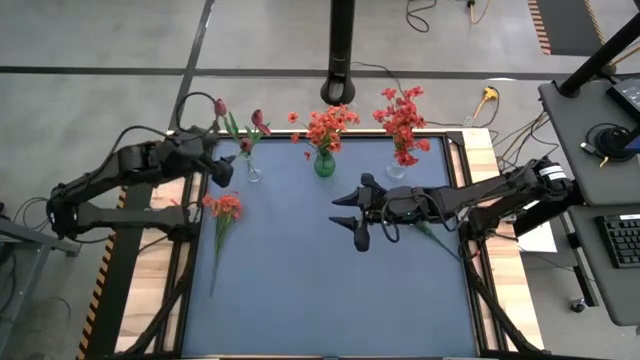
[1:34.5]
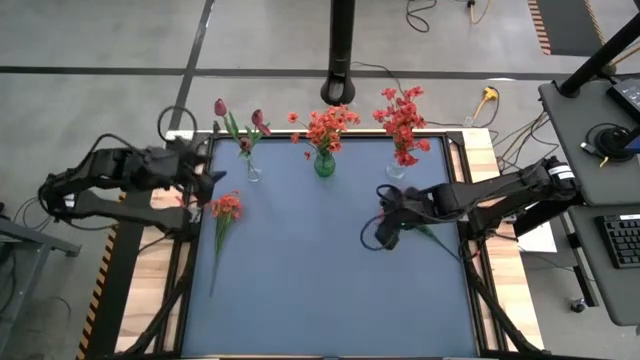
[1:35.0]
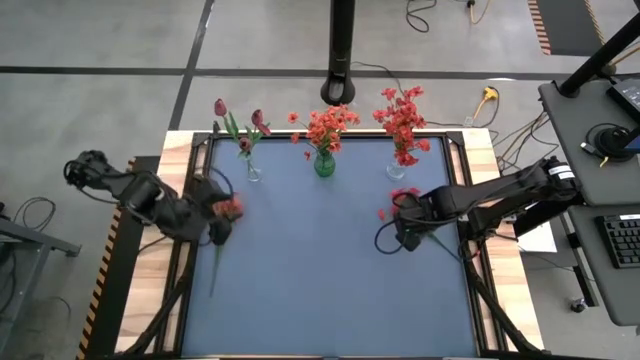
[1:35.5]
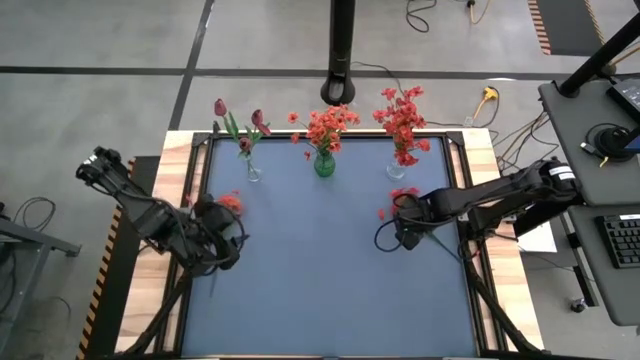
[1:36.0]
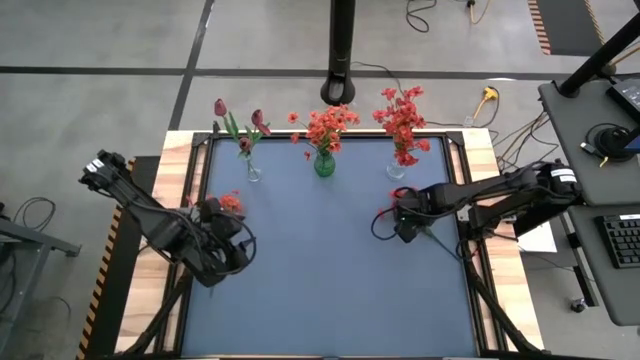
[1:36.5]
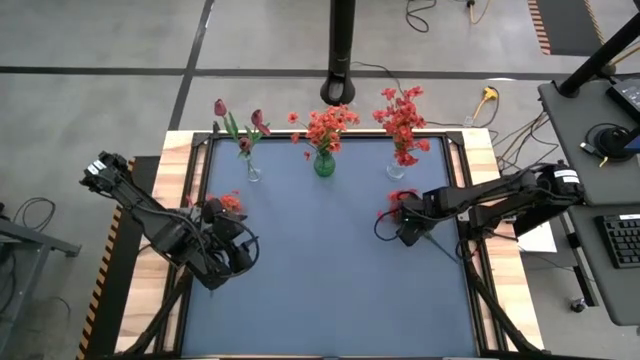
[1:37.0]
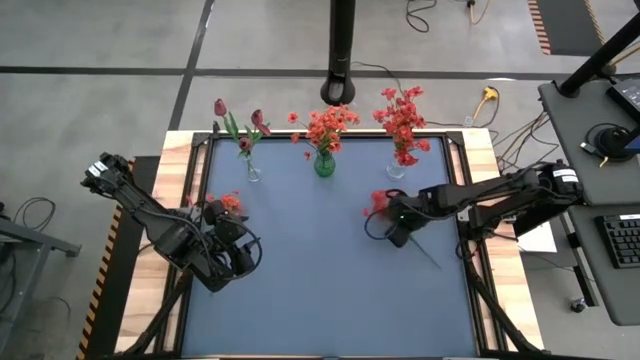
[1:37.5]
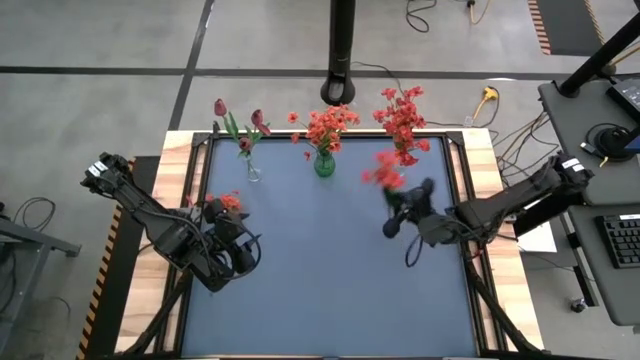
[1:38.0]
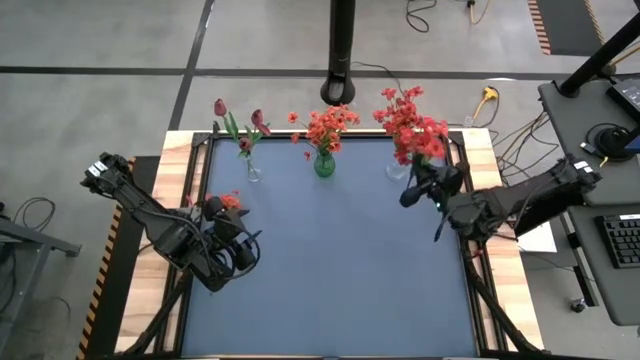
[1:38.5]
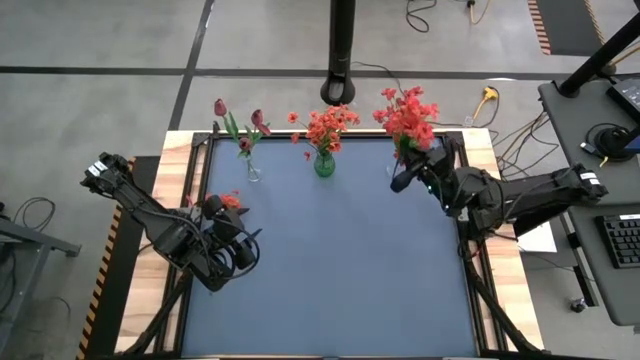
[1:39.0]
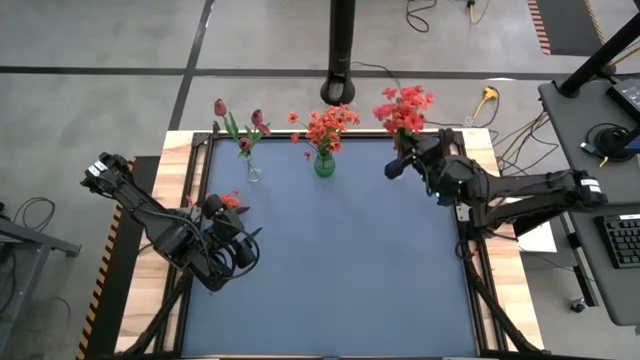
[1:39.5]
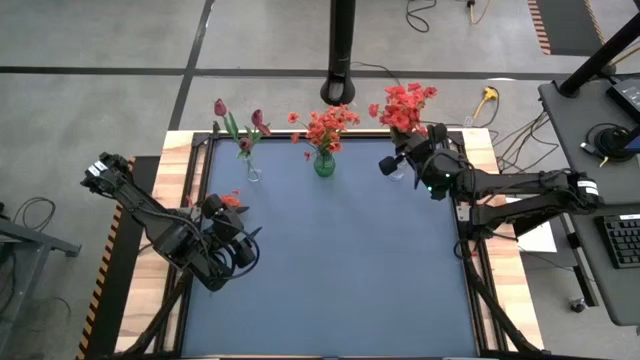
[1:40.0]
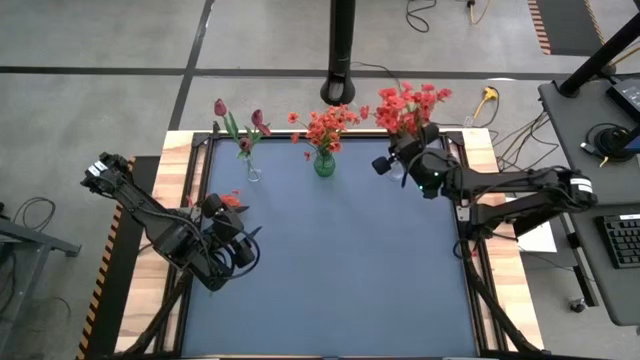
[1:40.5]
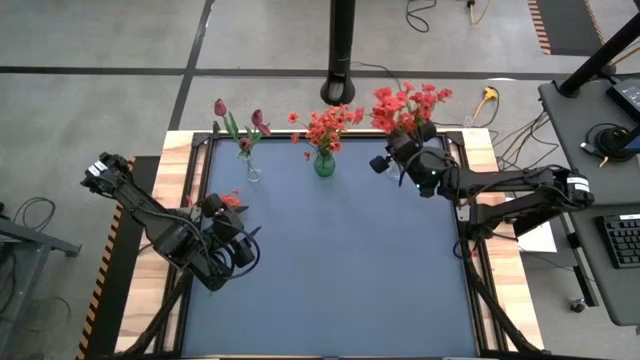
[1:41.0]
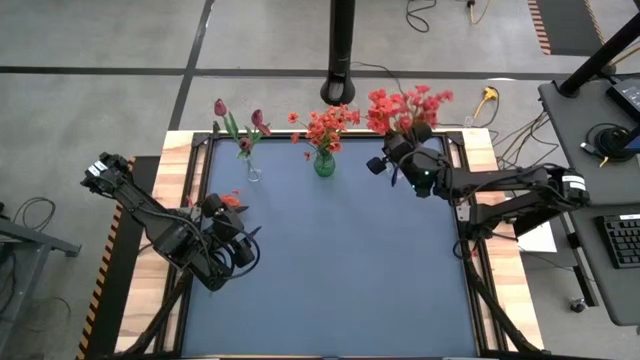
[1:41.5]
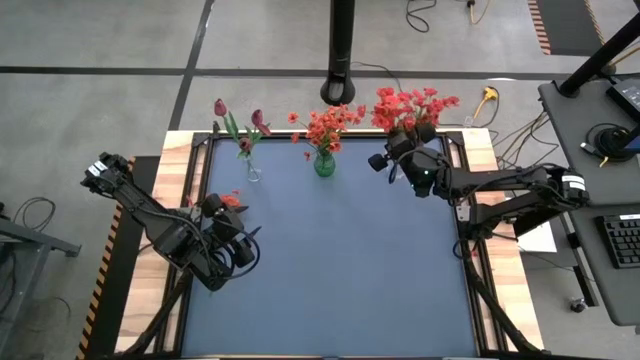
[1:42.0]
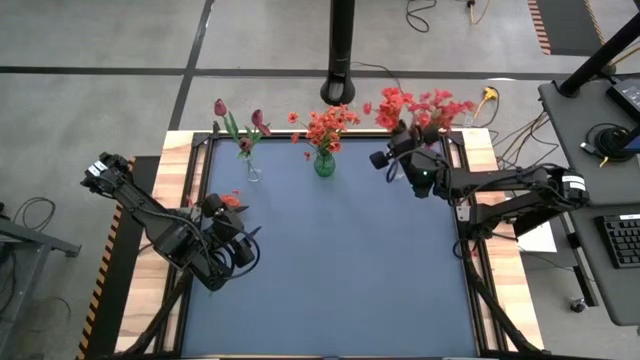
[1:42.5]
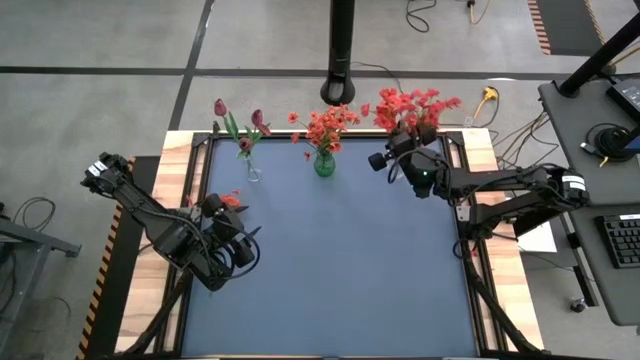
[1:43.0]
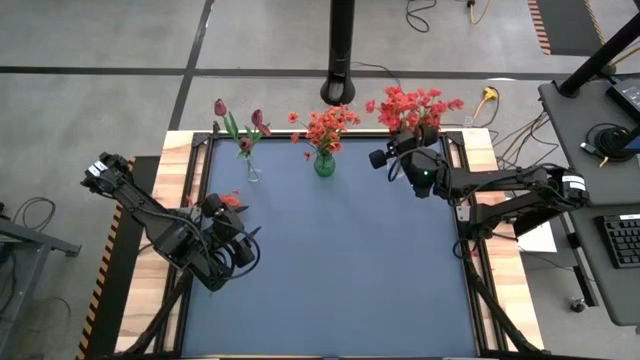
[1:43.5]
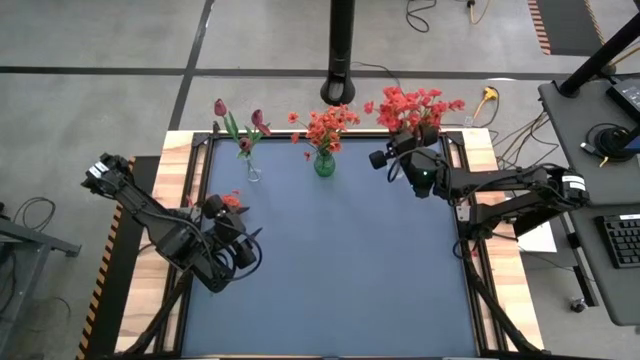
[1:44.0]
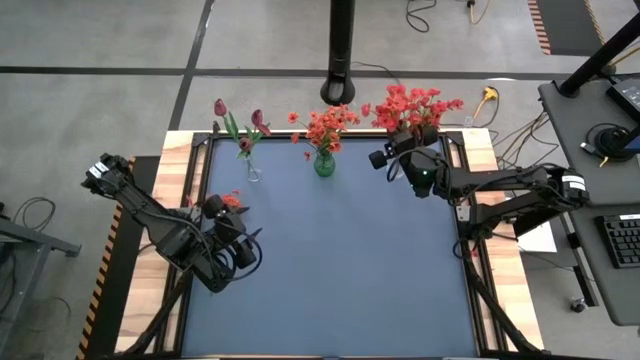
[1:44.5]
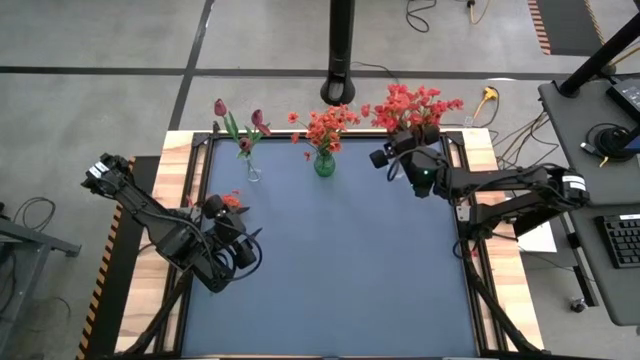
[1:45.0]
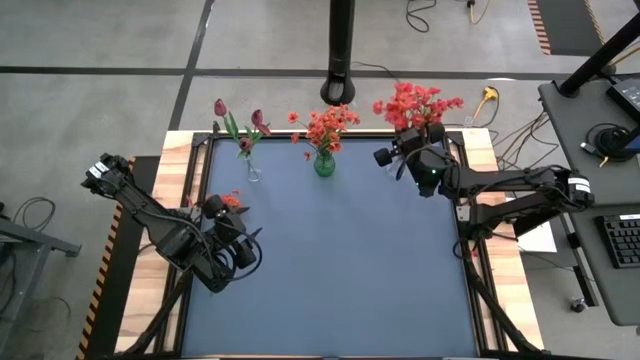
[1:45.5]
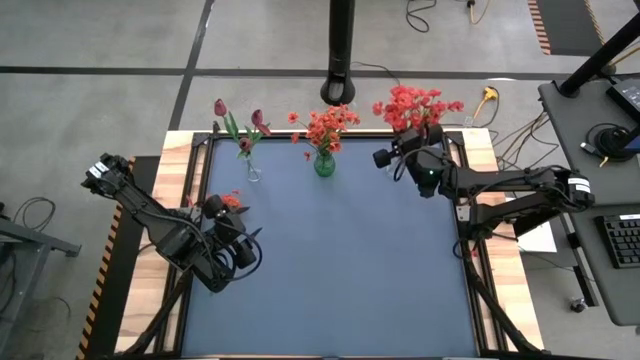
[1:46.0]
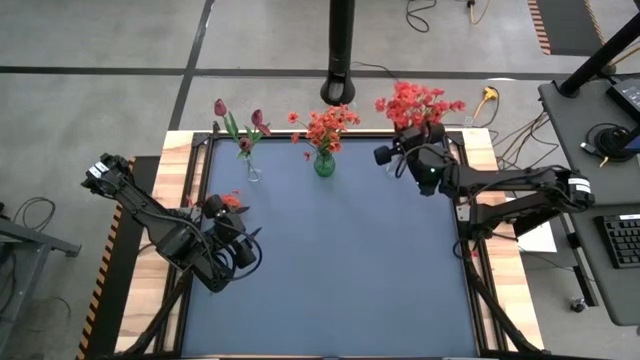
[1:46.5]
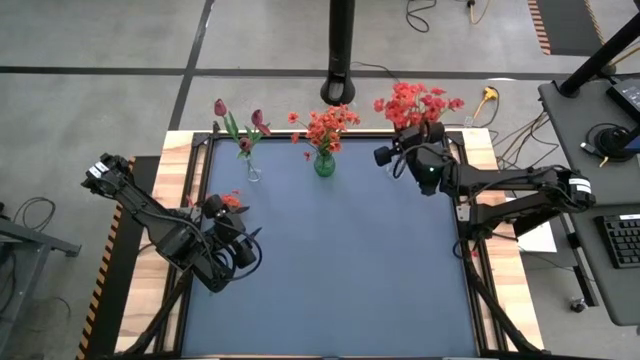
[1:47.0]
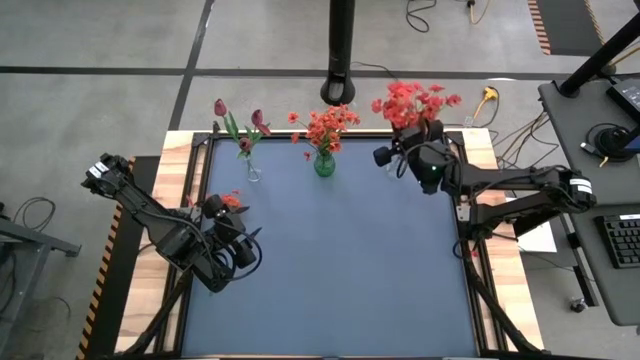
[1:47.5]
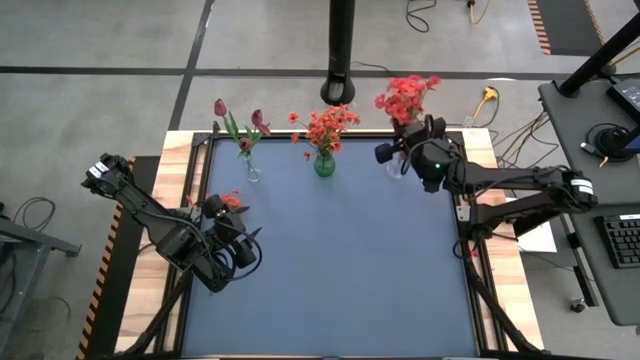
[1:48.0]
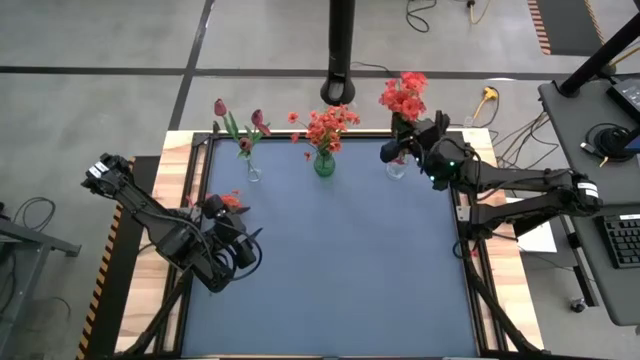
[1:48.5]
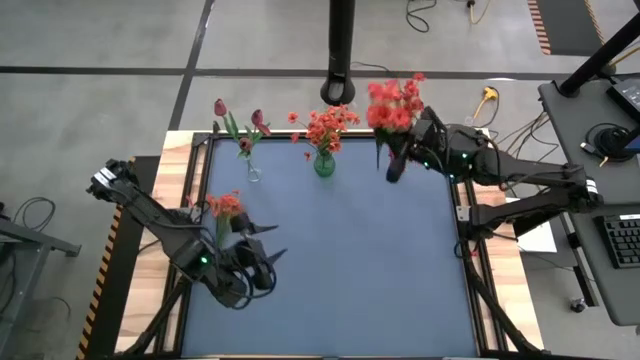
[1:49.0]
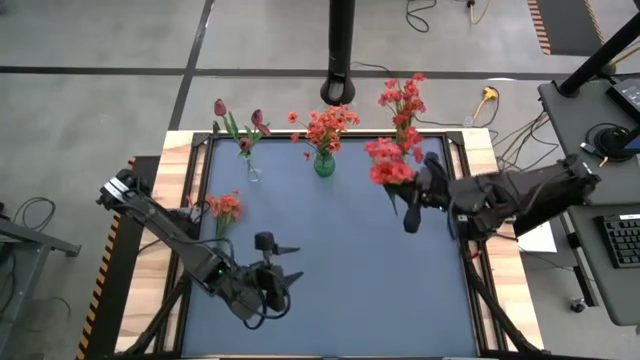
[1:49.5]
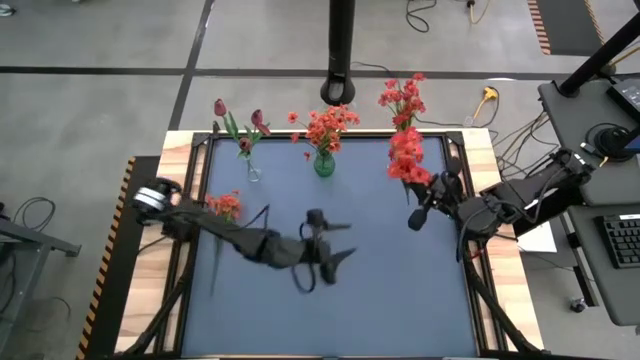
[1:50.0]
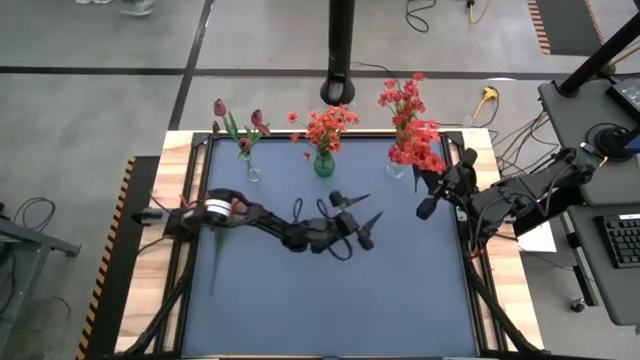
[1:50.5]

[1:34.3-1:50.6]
Task: Sort flowers into vase by color
Put the red flowers into the right transparent vase

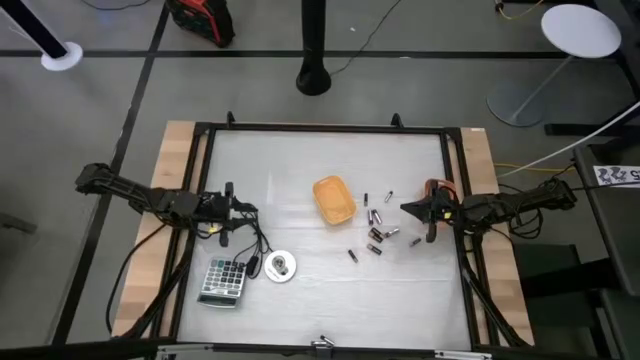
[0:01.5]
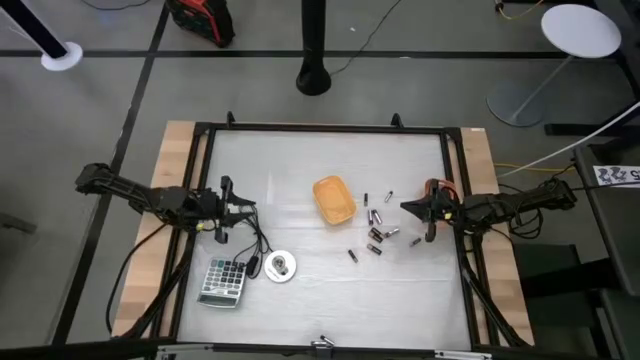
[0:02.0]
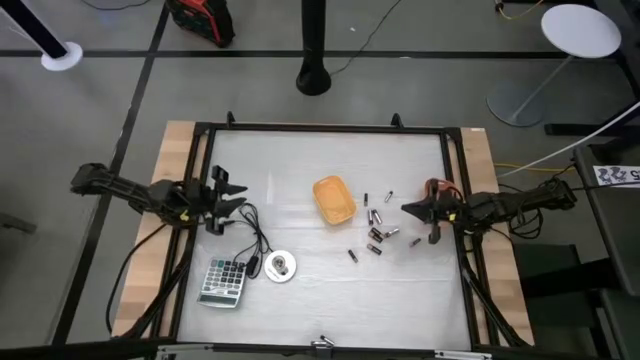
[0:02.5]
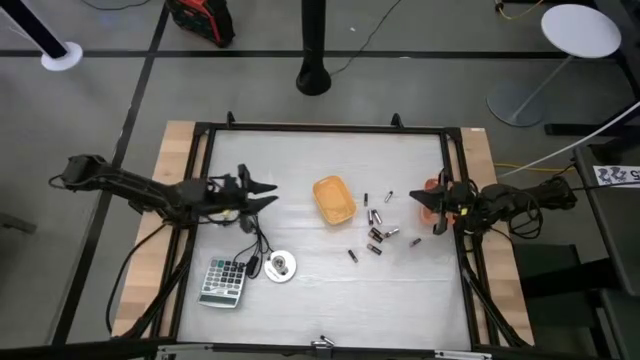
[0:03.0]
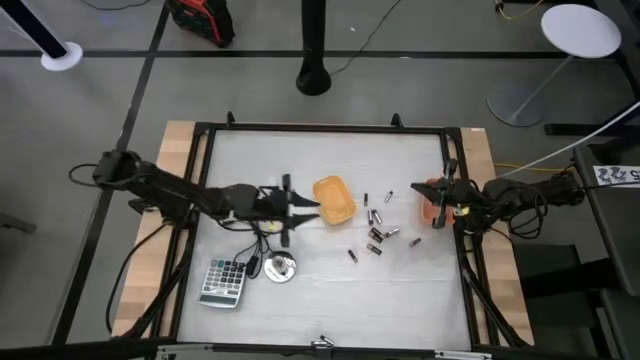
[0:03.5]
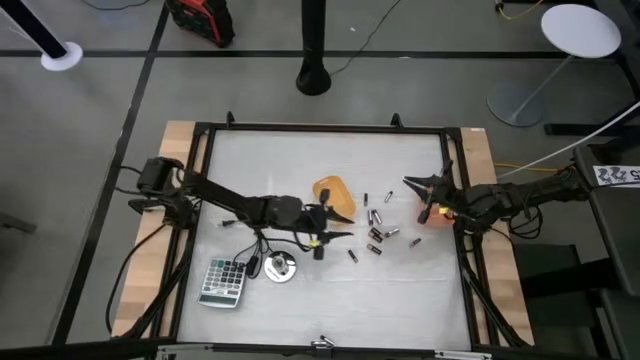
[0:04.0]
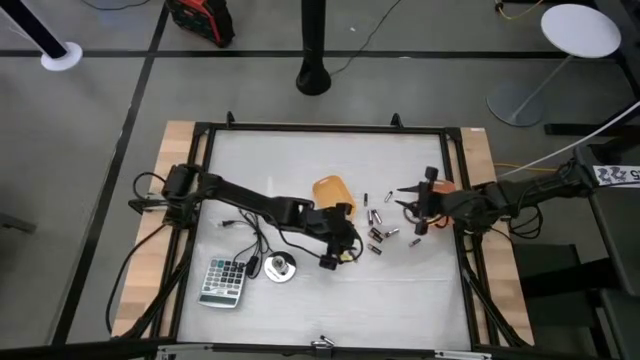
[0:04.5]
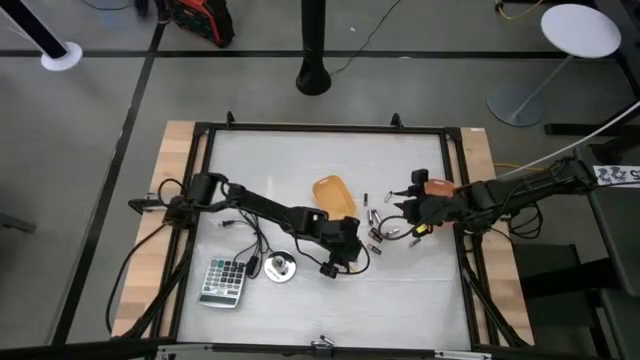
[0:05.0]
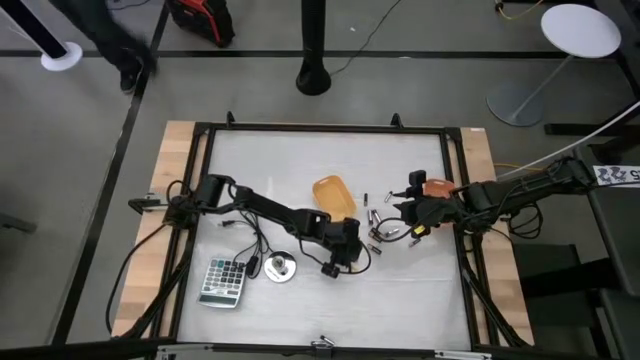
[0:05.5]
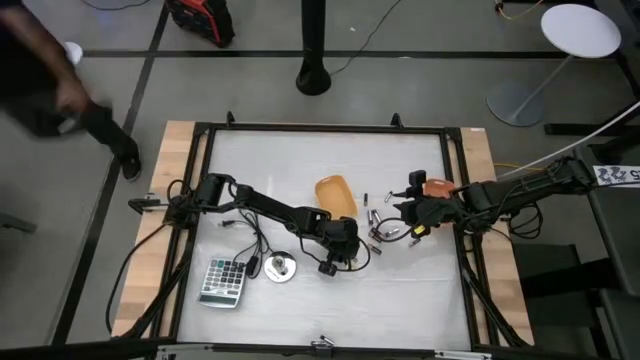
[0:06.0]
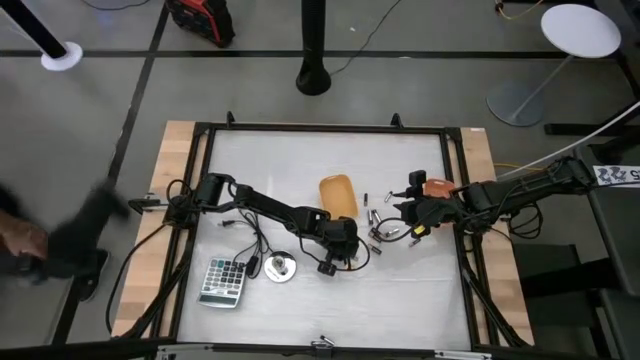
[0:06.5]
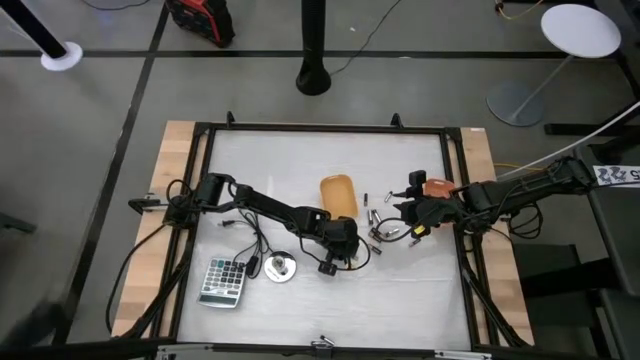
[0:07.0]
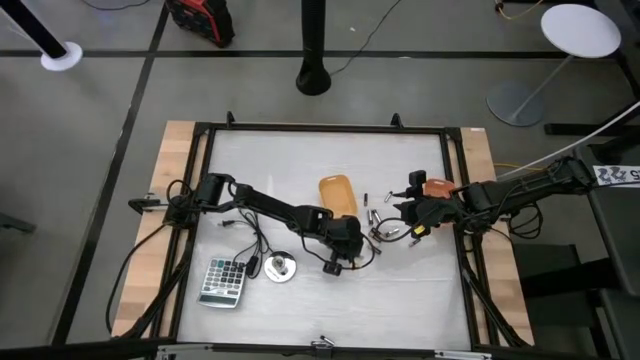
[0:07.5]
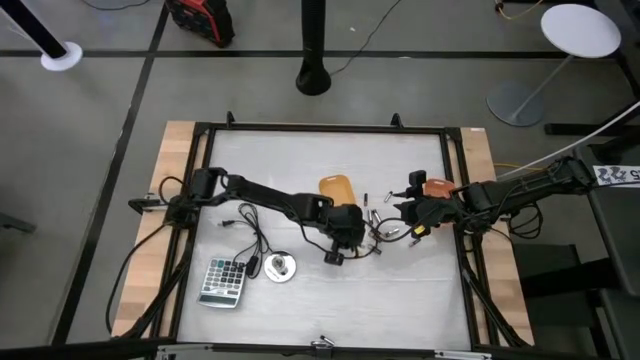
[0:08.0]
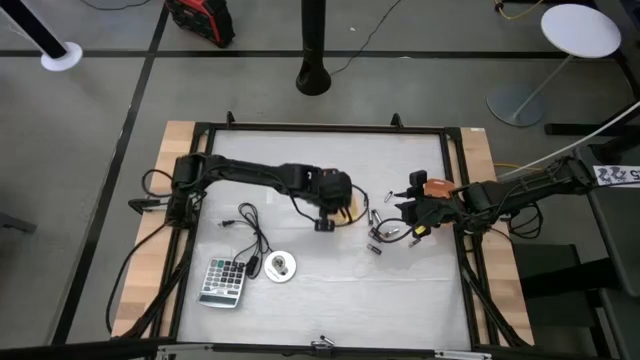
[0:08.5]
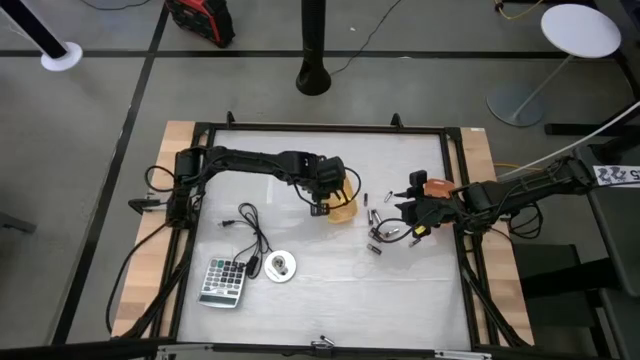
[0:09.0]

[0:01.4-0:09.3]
Task: Sort batteries
Put the black battery into the yellow bin
